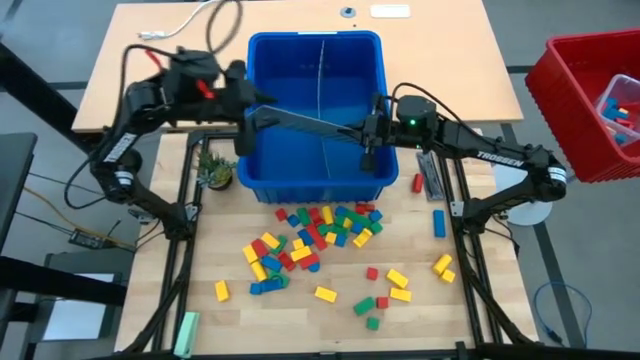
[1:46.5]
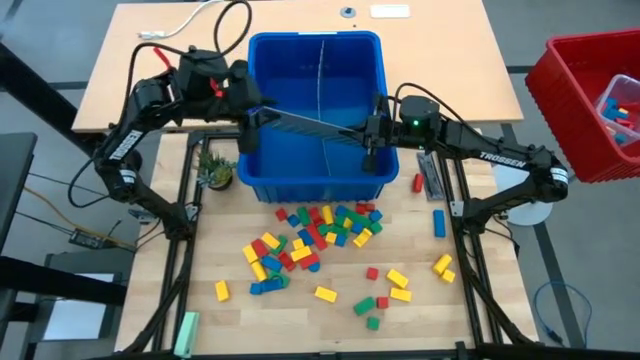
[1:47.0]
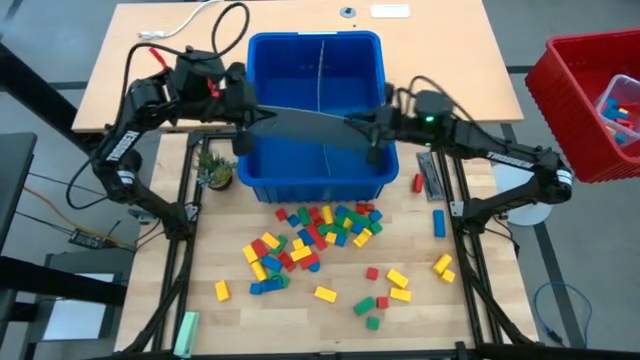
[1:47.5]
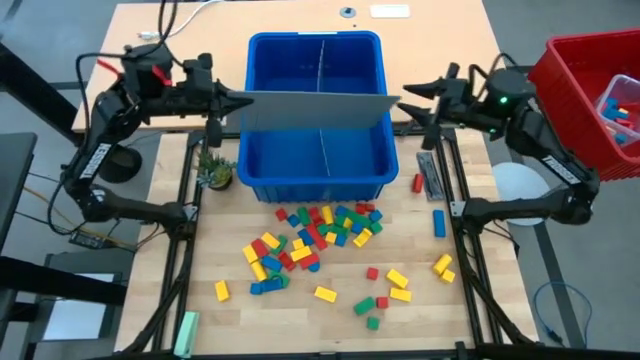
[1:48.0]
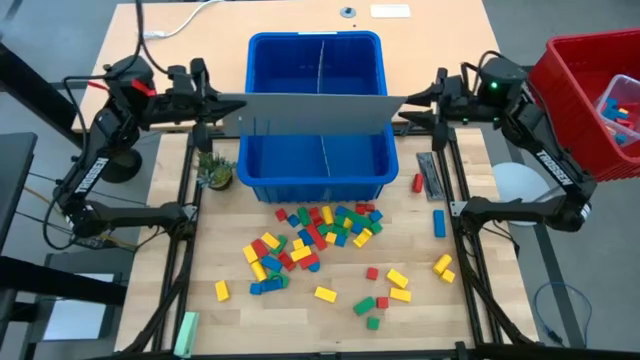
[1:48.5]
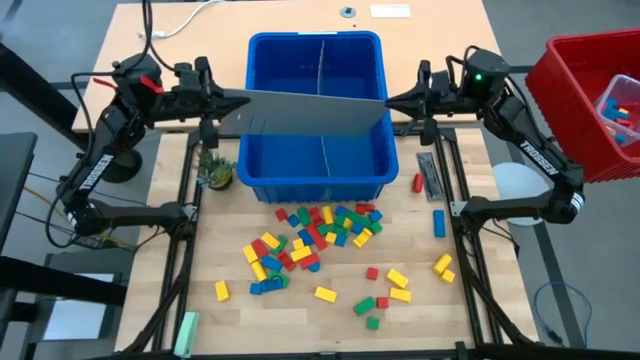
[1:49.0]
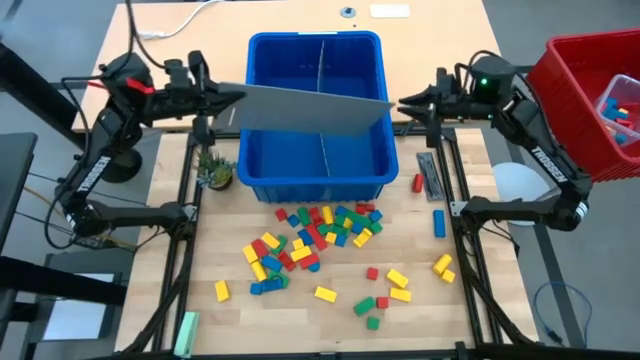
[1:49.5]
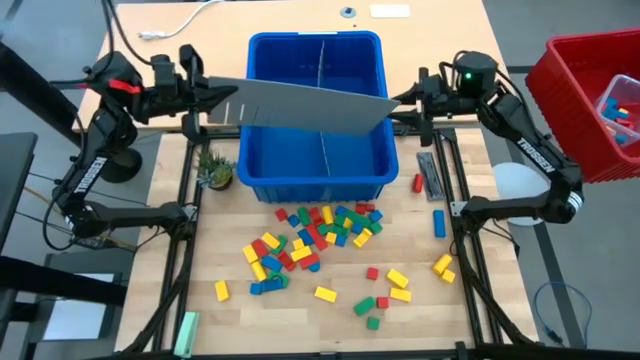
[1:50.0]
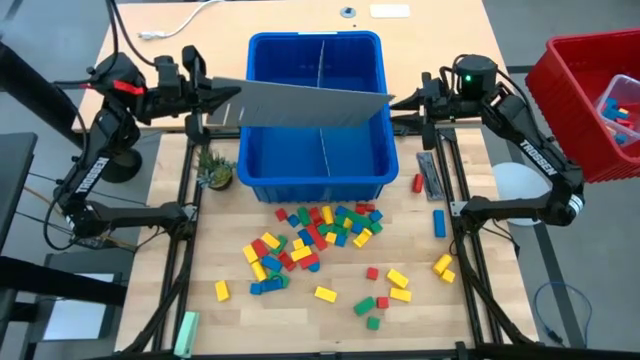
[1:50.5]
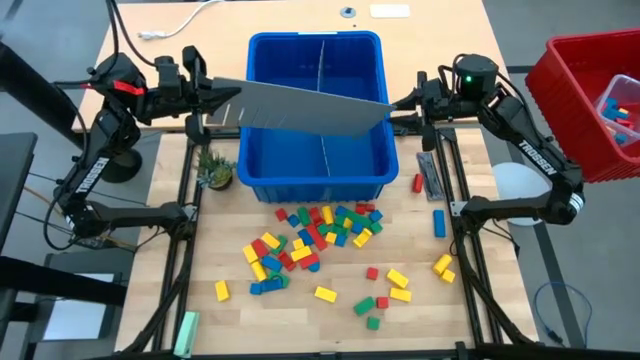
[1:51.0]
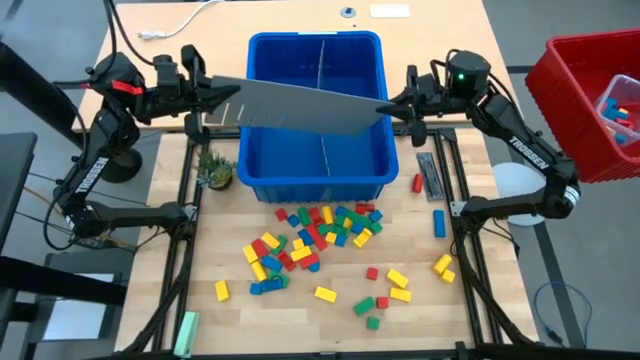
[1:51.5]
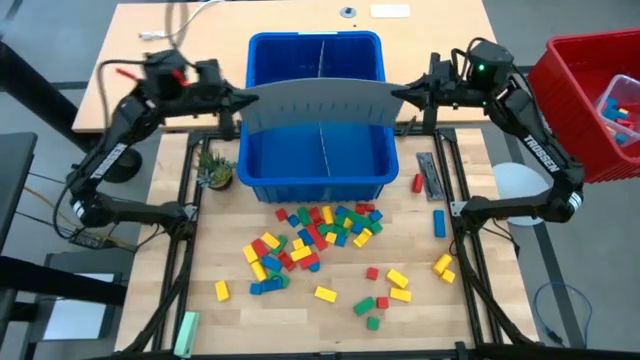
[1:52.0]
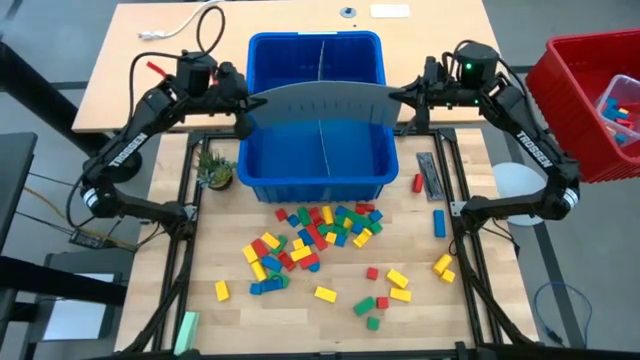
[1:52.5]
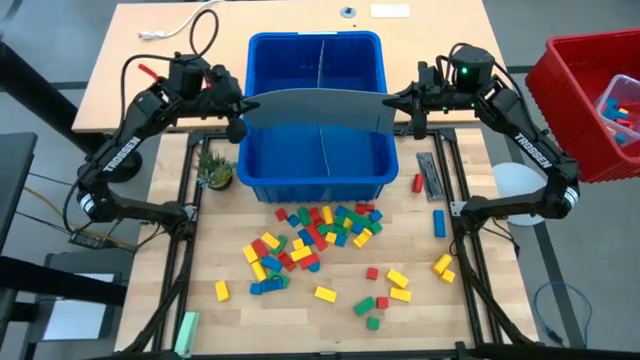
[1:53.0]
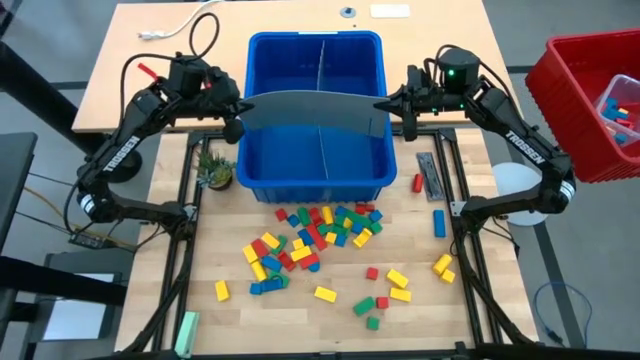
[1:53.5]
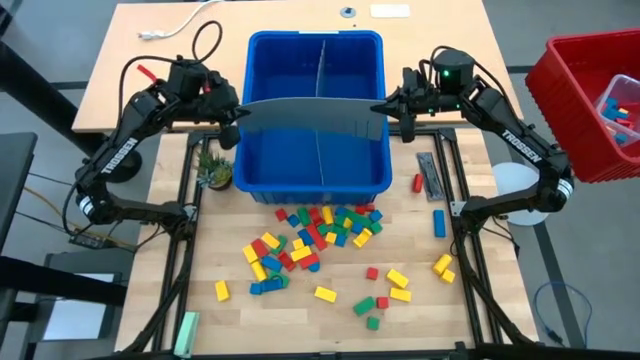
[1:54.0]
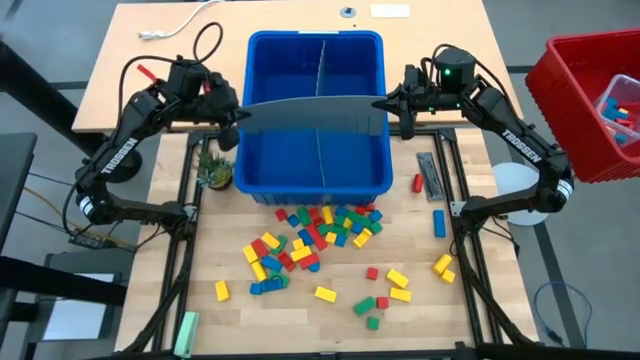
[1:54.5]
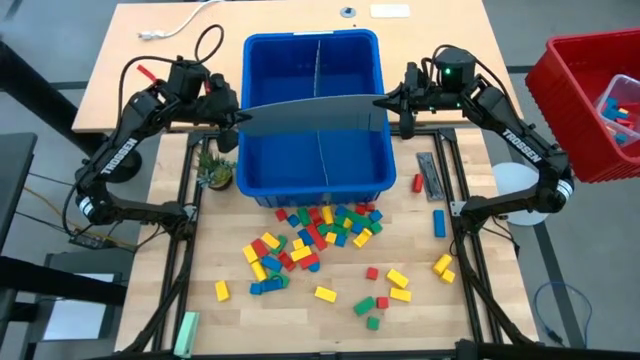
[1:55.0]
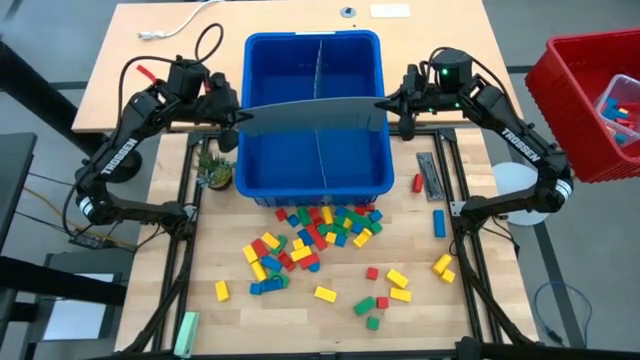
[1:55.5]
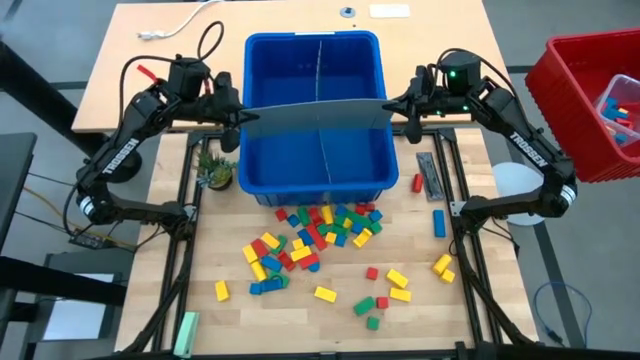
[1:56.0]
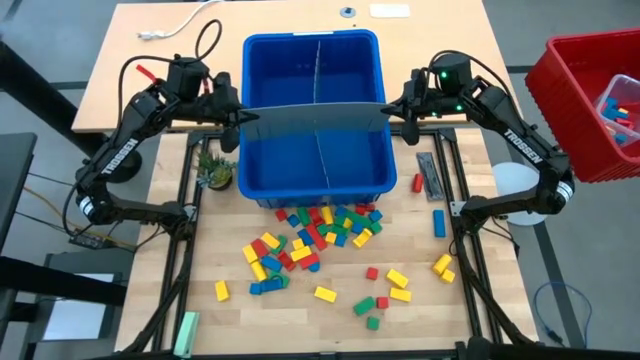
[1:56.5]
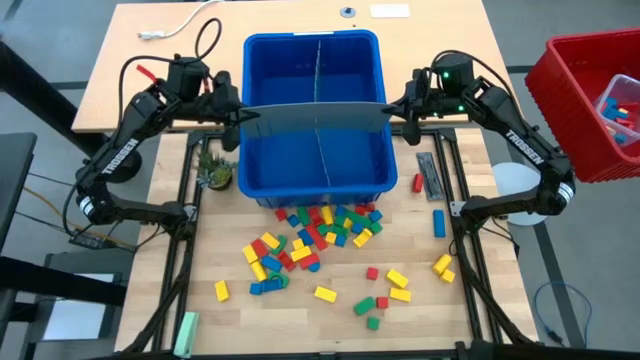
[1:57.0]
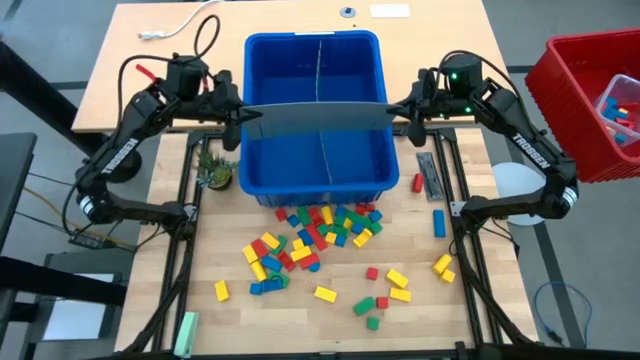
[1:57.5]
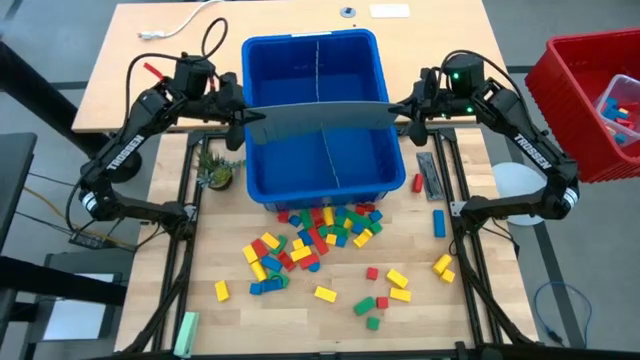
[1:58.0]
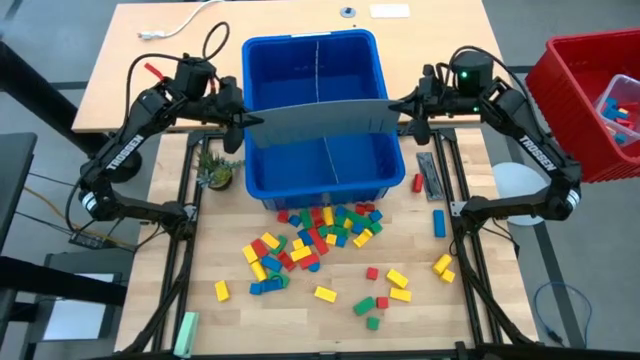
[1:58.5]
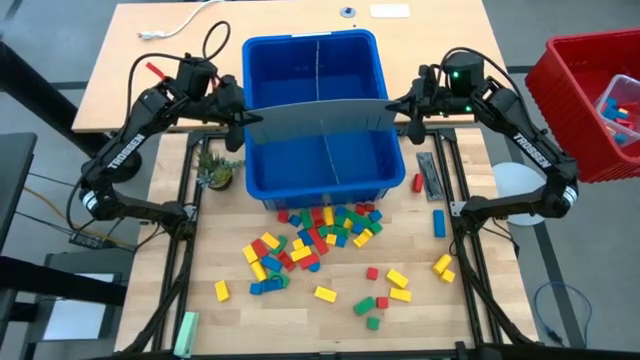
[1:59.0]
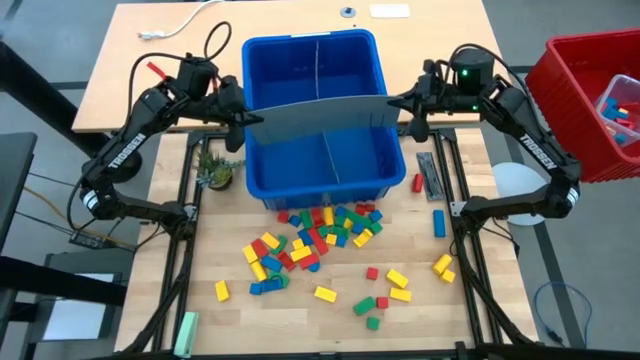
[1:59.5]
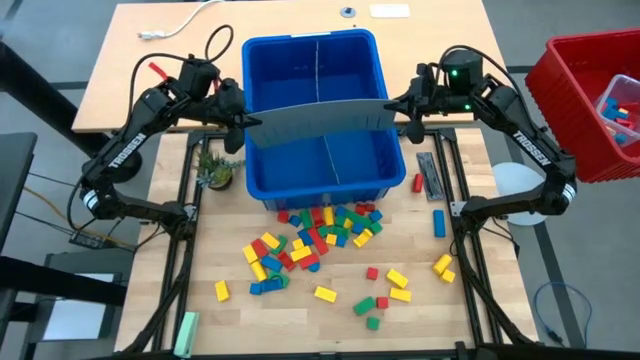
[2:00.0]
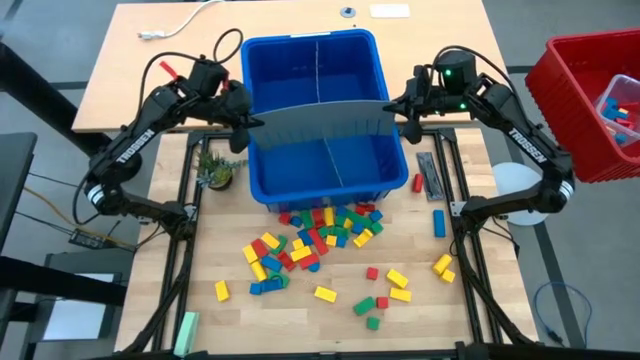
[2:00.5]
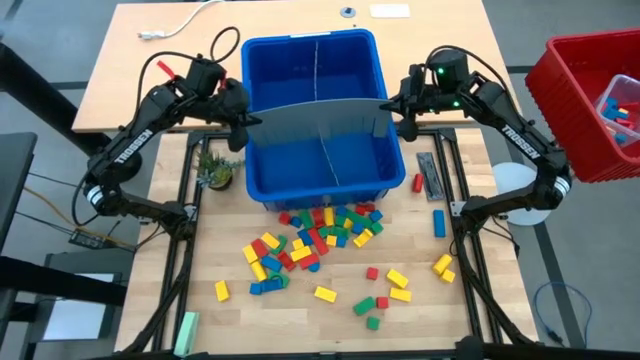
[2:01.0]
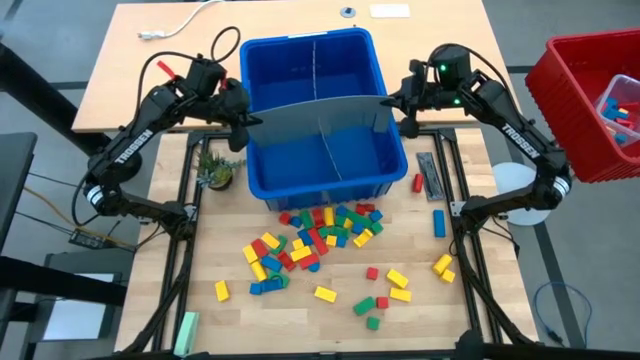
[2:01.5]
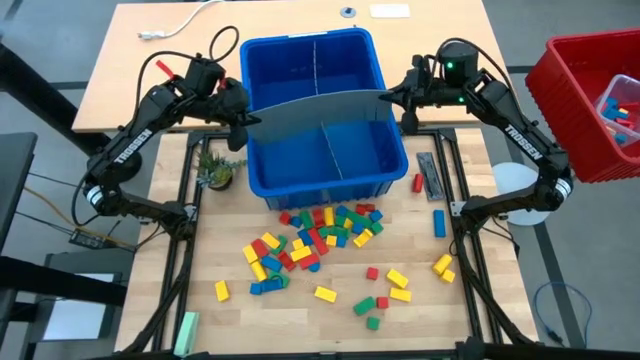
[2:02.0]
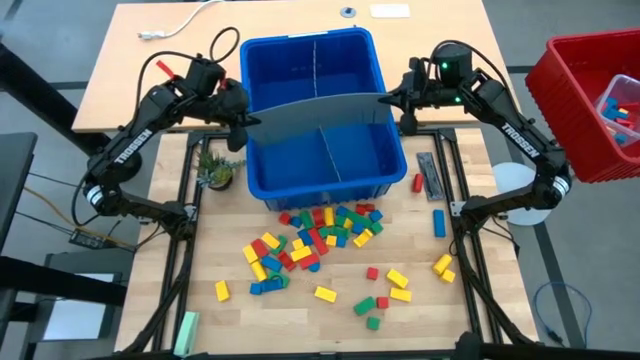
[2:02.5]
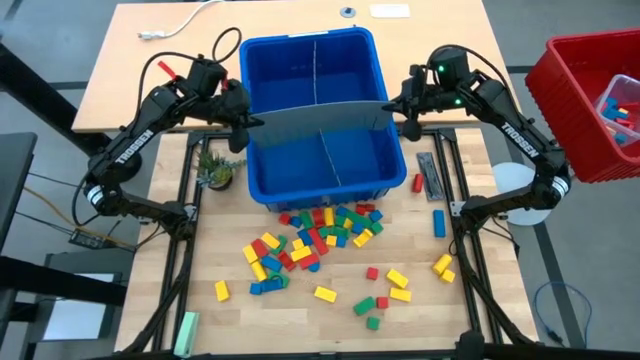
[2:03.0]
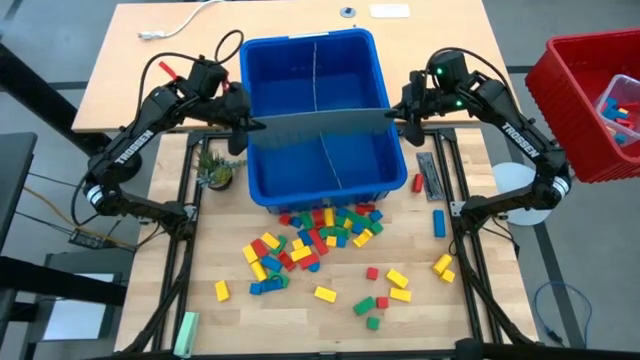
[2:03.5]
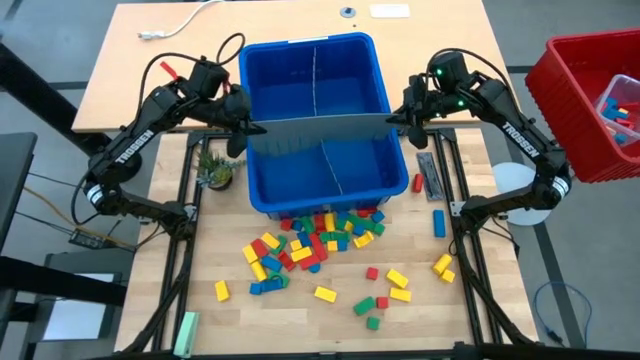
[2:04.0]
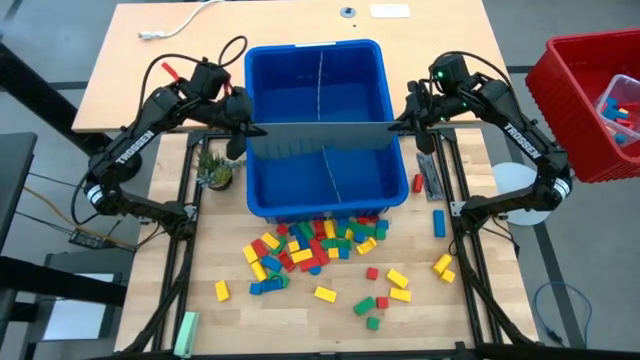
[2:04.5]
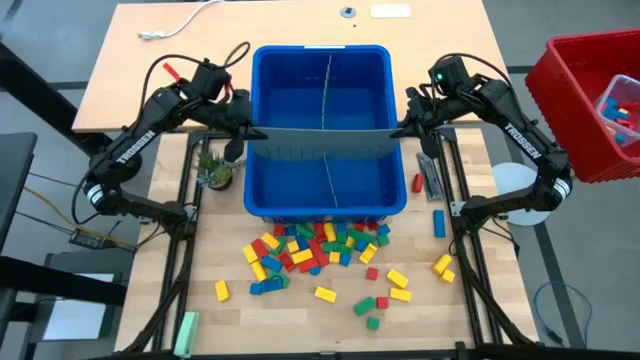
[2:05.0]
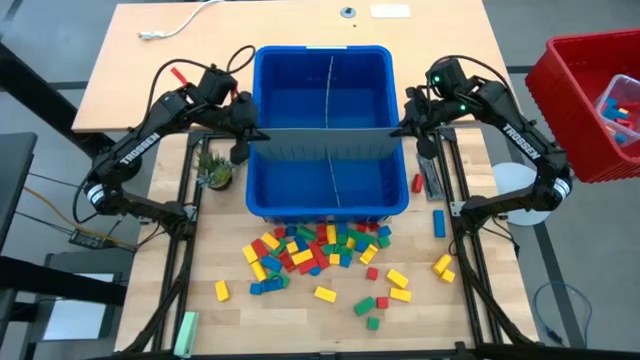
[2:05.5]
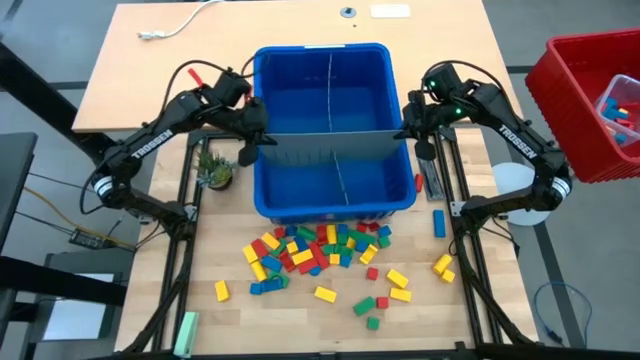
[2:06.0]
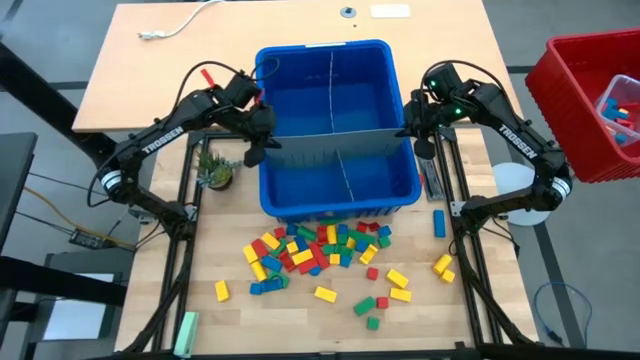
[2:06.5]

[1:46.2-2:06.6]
Task: Sort blocks
Assemble the blue bin using gray bin divider
